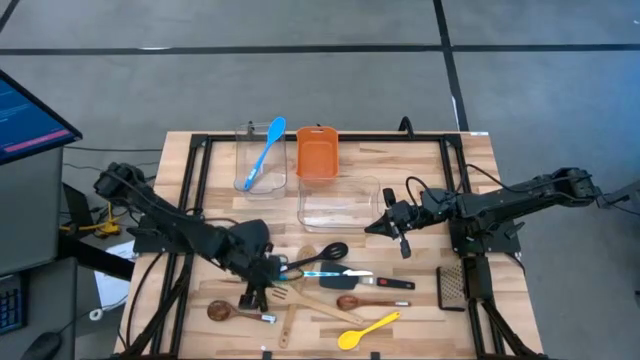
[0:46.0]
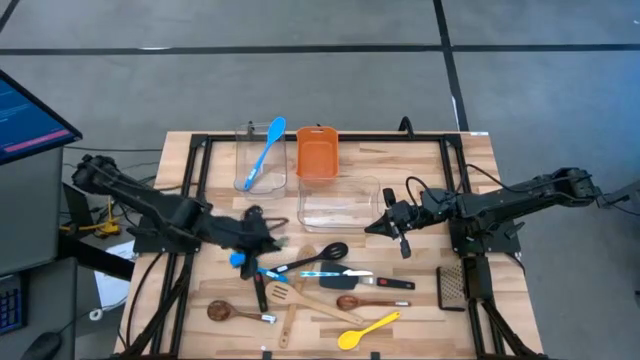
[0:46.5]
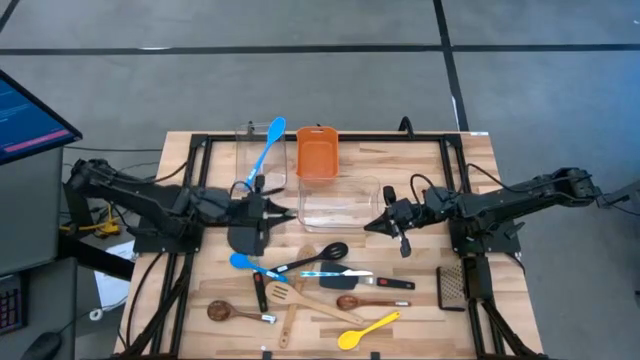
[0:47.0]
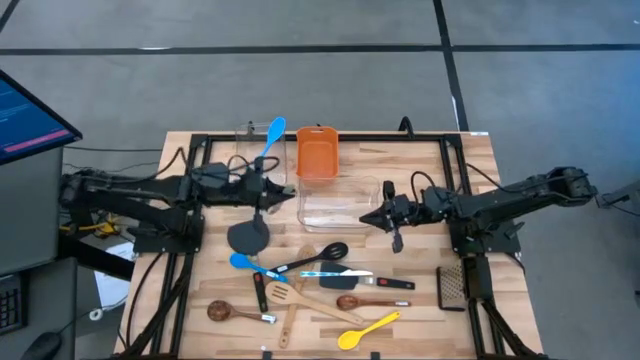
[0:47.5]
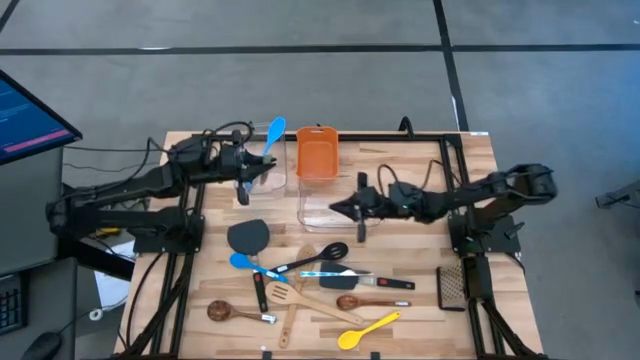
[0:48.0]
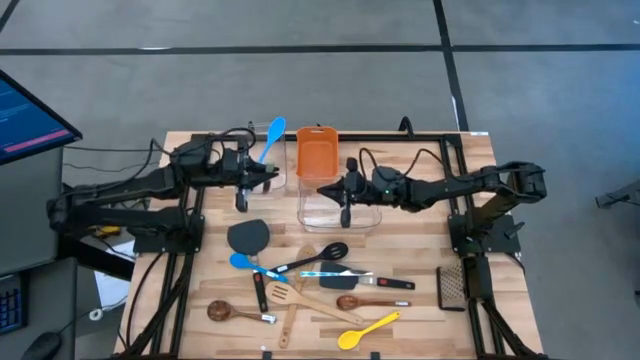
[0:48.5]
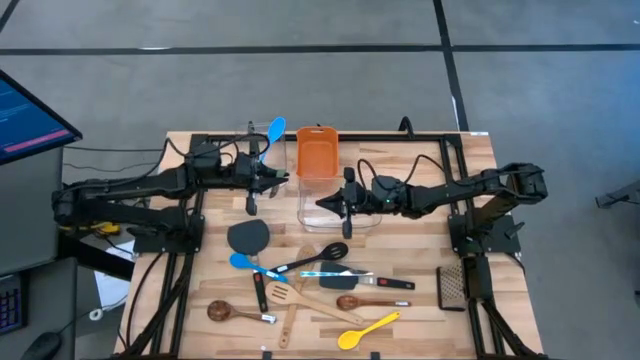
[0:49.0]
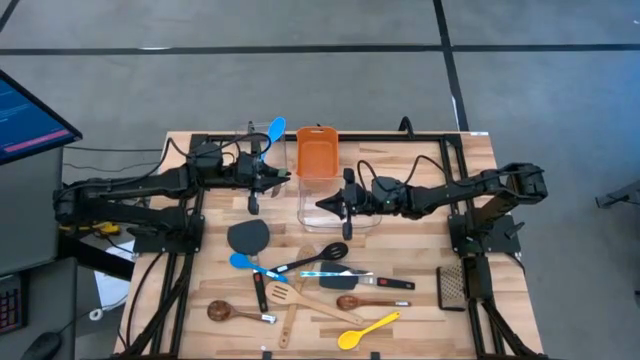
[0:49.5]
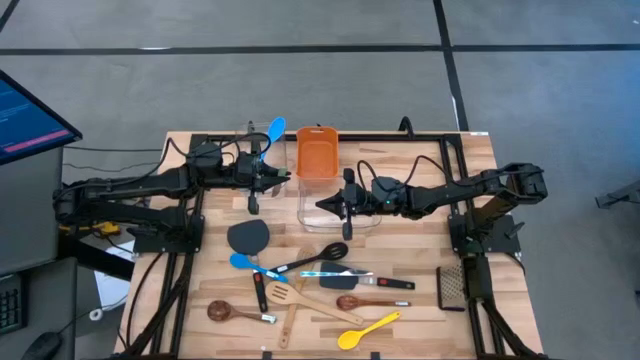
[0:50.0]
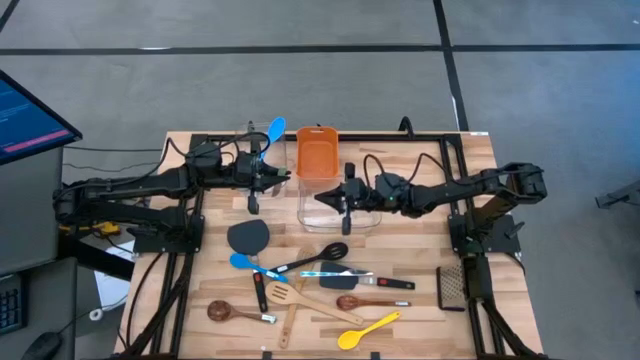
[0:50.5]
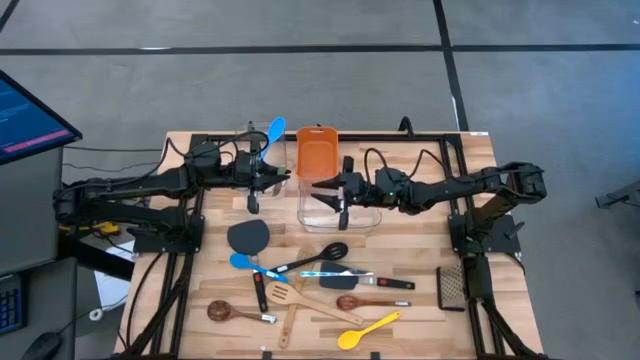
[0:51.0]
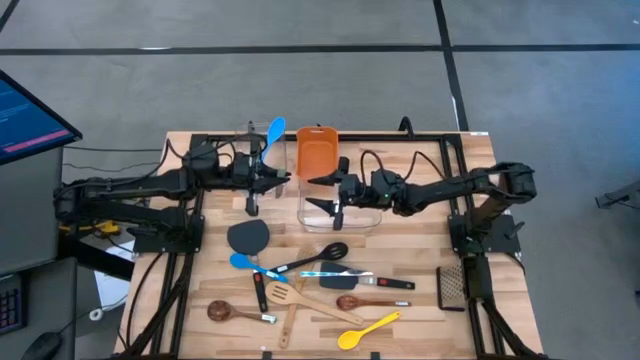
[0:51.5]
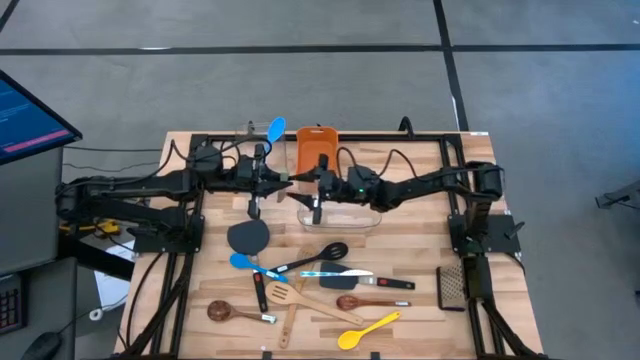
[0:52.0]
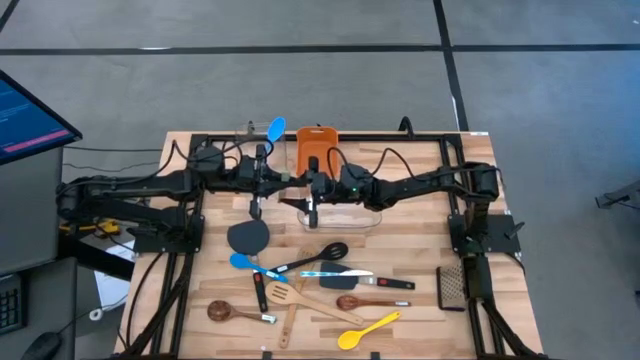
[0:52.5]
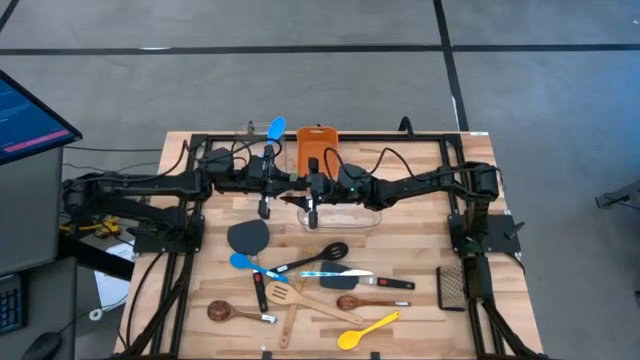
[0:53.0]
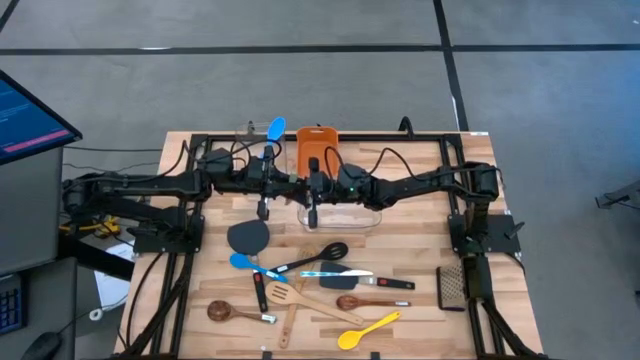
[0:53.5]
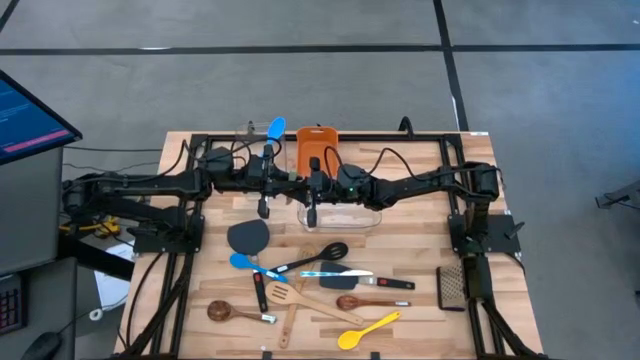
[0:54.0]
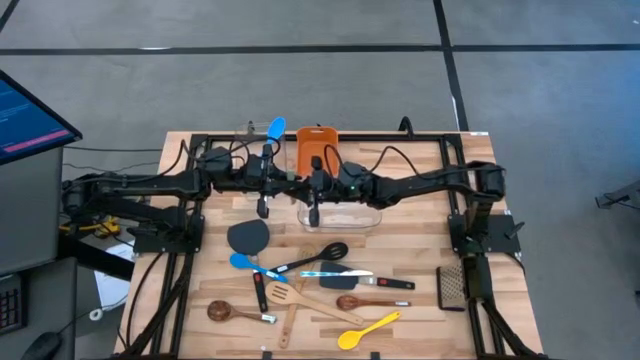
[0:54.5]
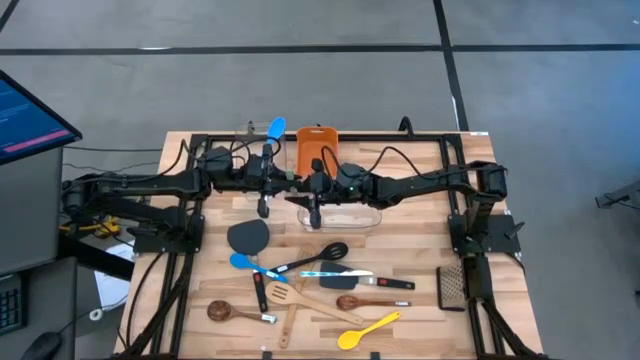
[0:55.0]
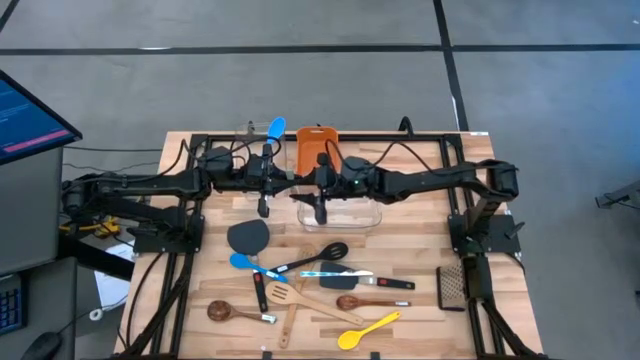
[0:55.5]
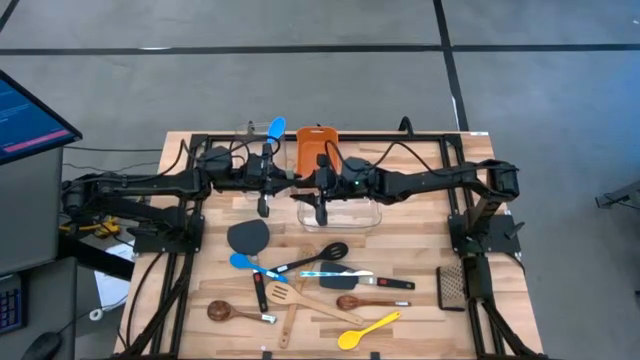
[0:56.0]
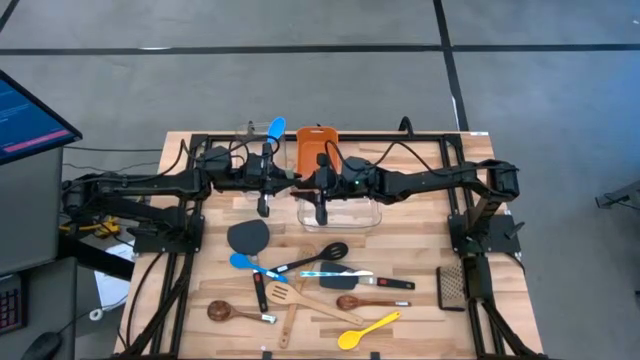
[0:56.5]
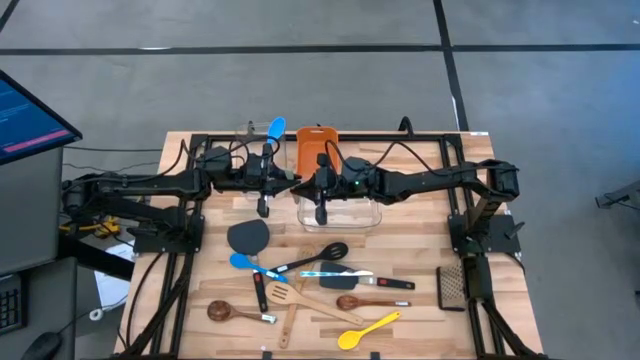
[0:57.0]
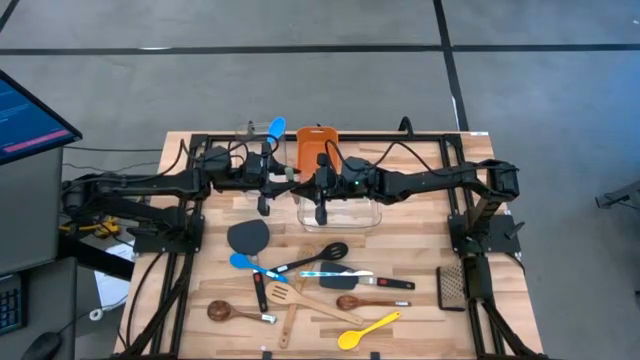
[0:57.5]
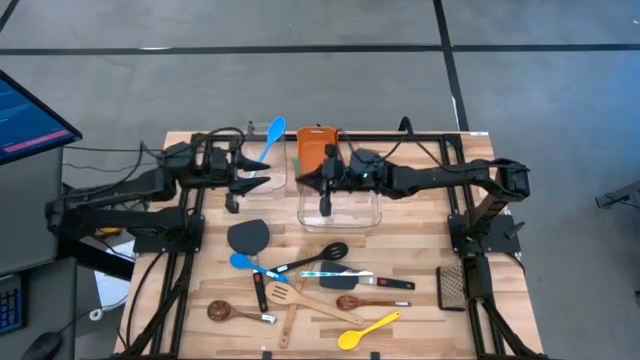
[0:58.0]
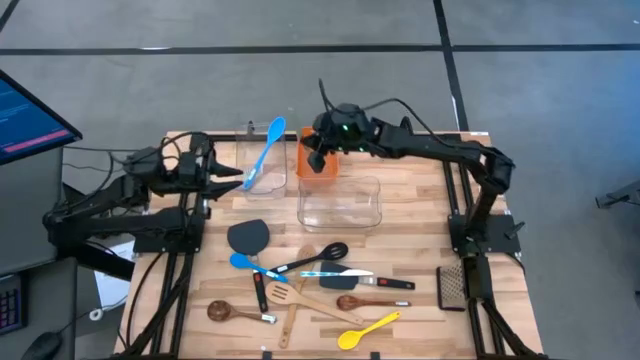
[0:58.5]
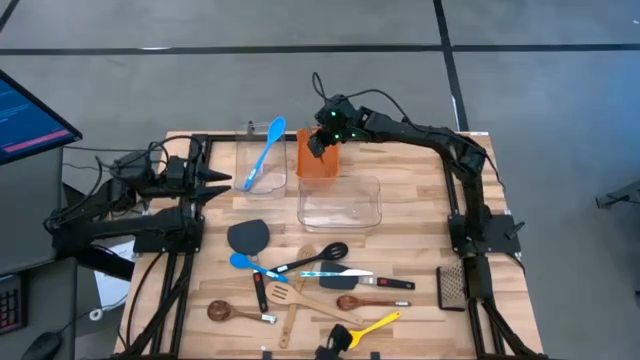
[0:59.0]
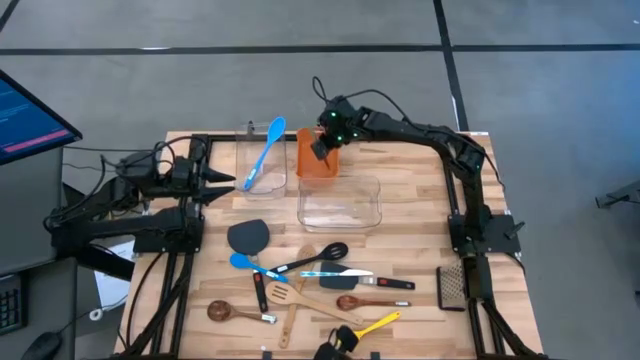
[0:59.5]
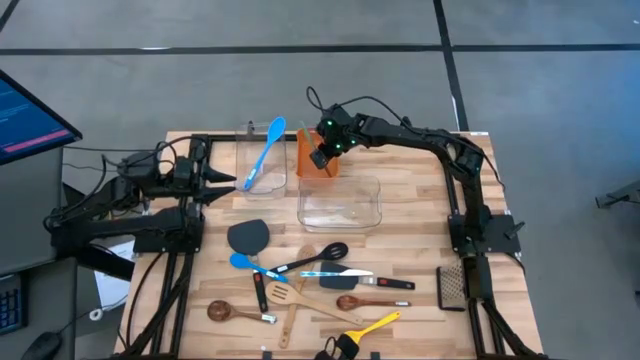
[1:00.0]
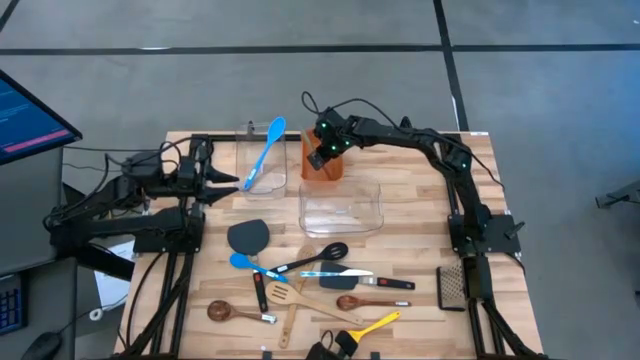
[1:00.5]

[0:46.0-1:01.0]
Task: Pick & Place Kitchen Items
Put the green knife into the orange bin

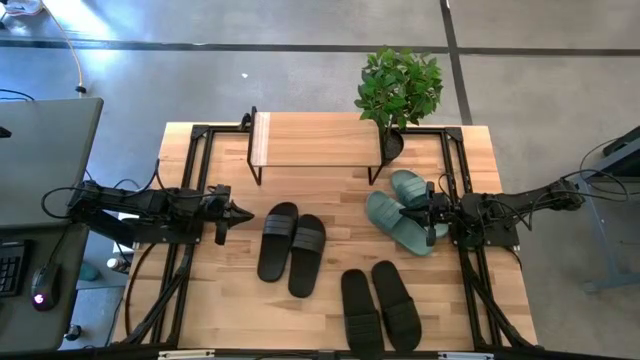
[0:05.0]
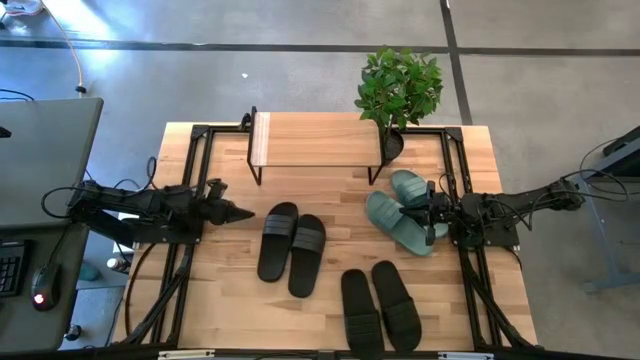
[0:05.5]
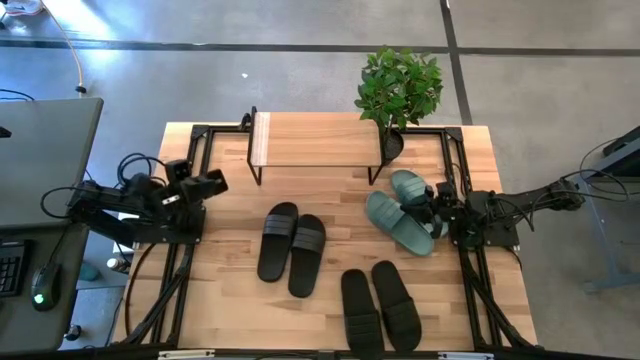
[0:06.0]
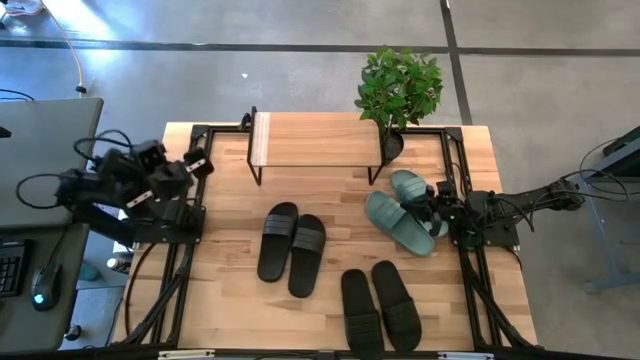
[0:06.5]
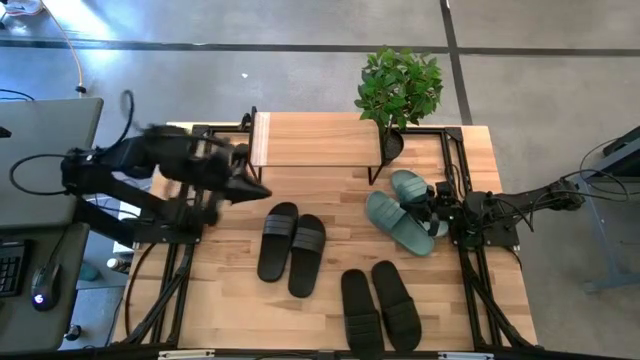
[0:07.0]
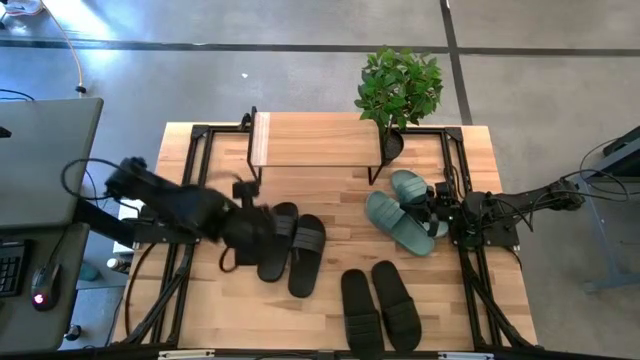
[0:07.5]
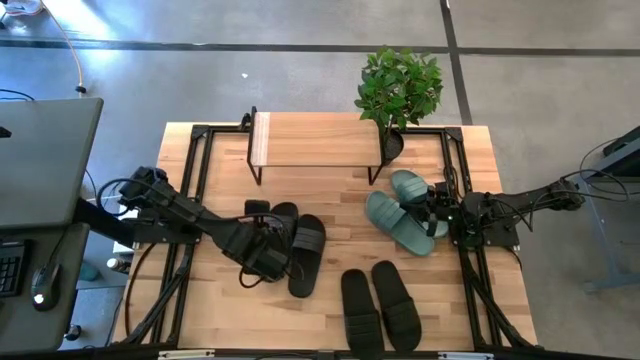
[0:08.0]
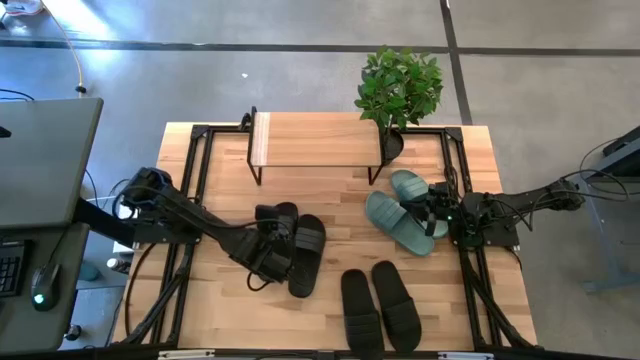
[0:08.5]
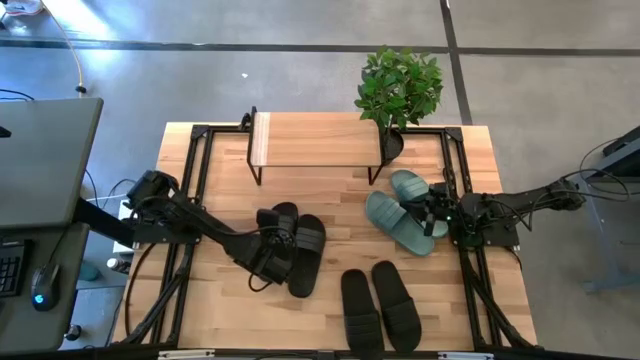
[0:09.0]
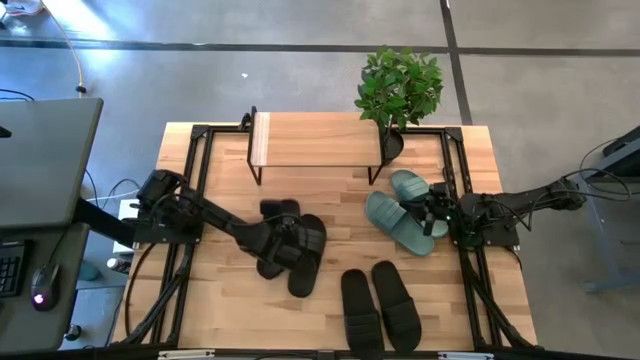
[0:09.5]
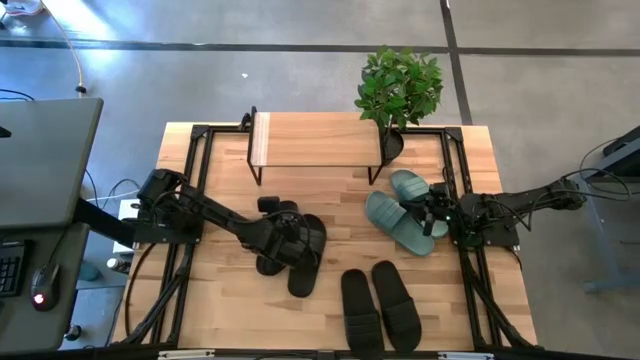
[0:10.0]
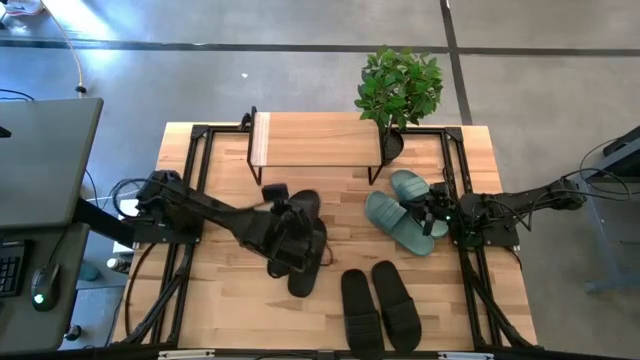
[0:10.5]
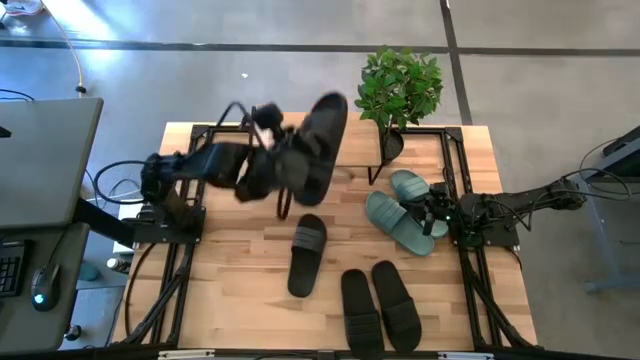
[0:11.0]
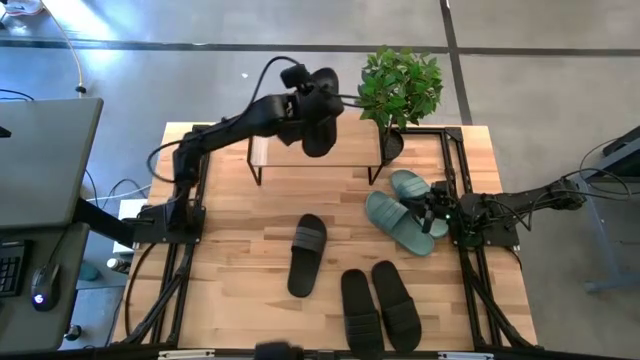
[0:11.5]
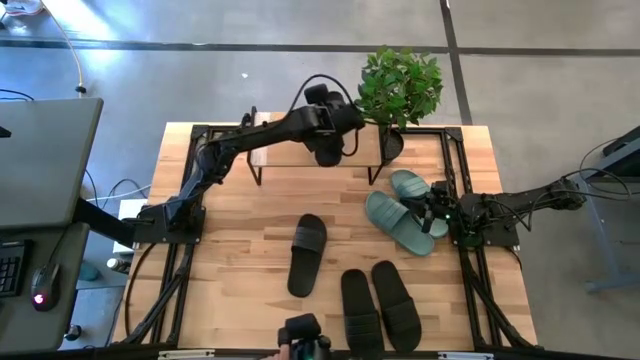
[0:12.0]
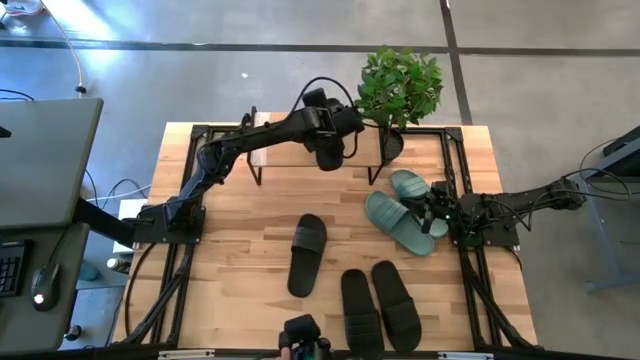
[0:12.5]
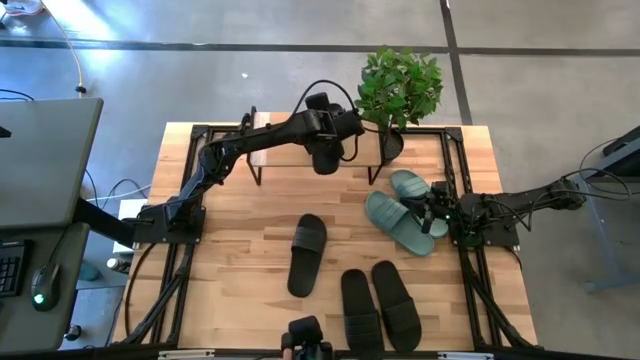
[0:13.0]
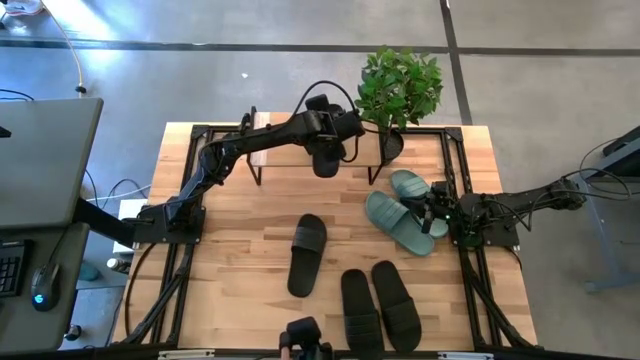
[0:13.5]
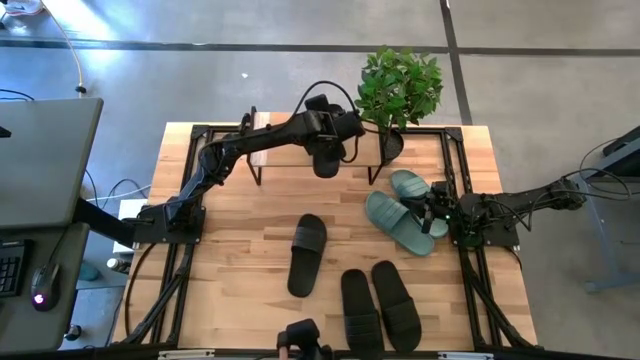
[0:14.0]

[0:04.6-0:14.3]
Task: Pick and place slides into the shelf
Put the black slipper on the shelf
